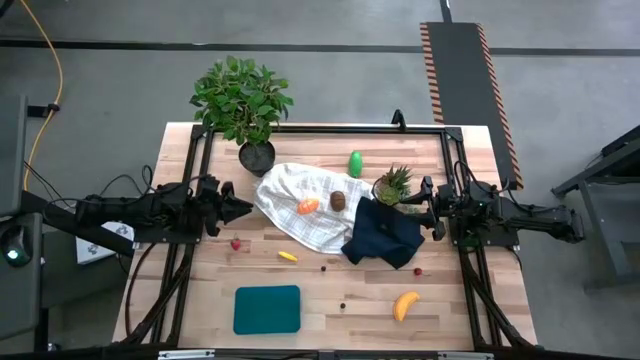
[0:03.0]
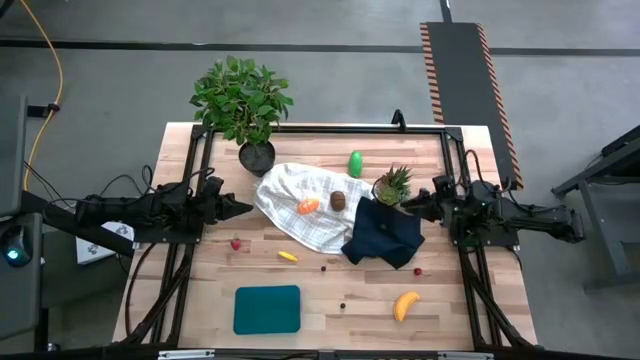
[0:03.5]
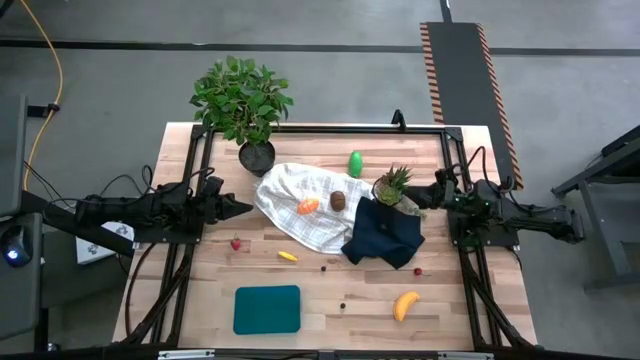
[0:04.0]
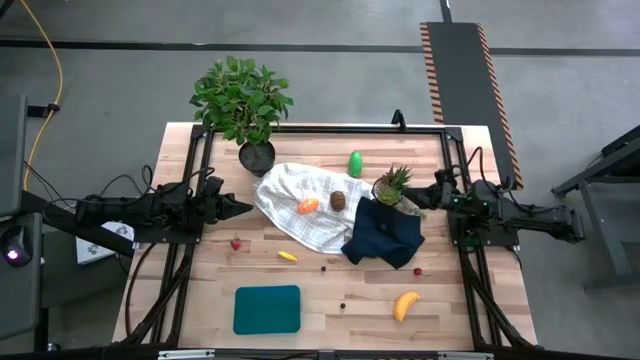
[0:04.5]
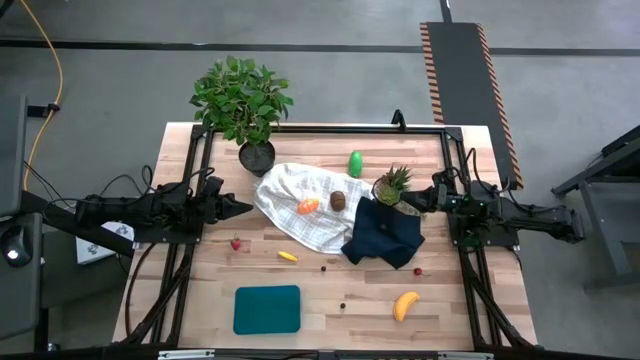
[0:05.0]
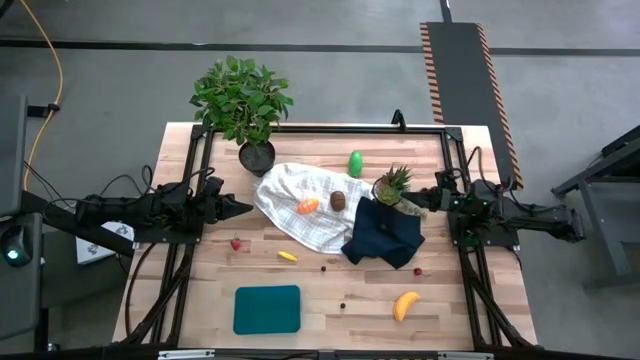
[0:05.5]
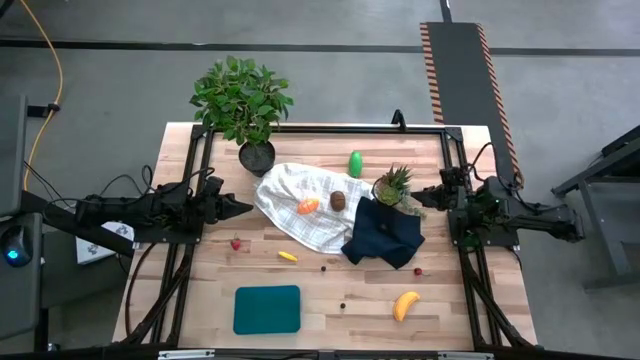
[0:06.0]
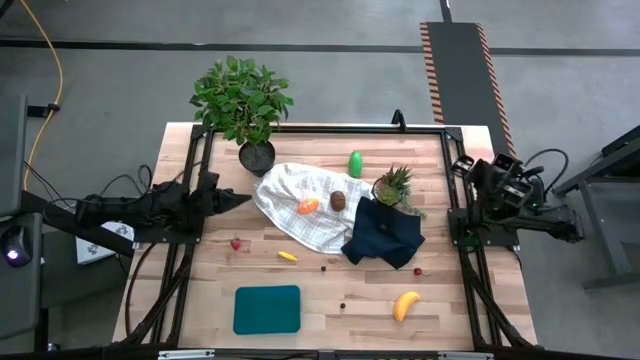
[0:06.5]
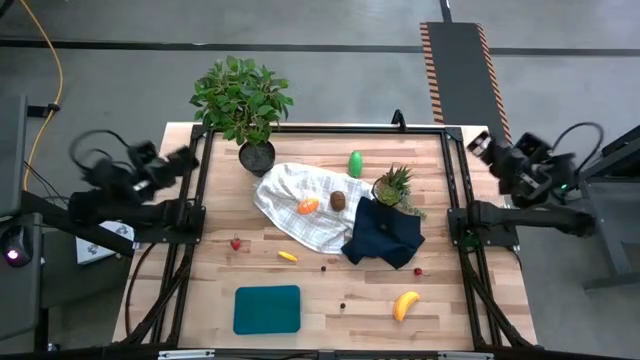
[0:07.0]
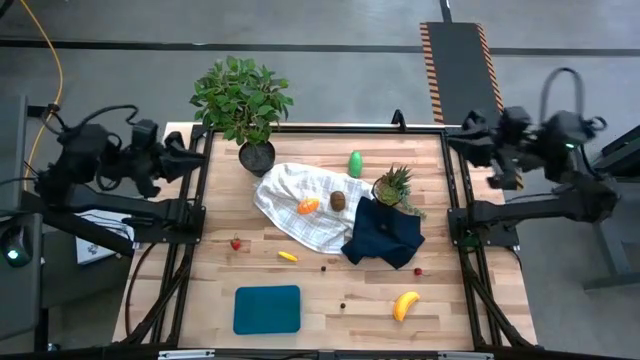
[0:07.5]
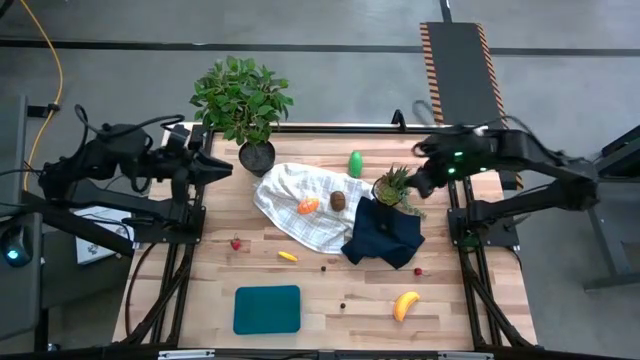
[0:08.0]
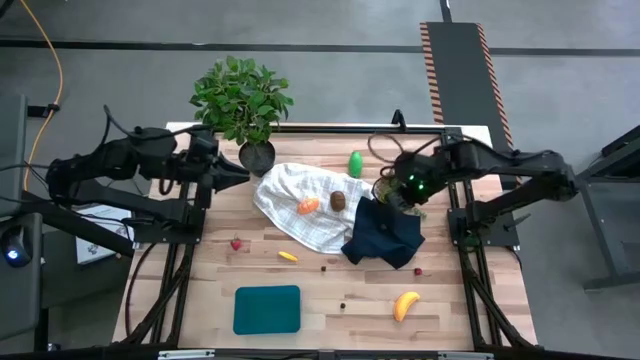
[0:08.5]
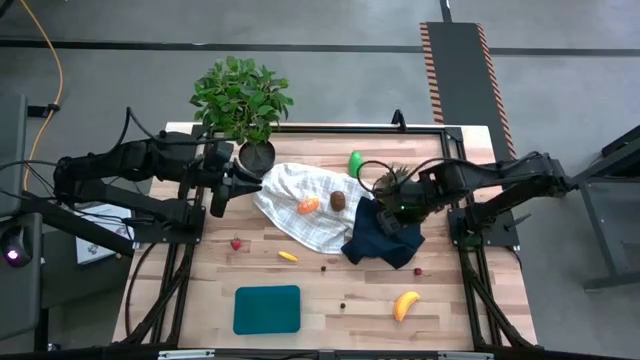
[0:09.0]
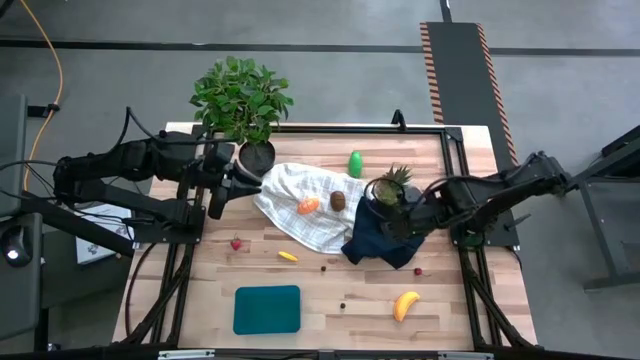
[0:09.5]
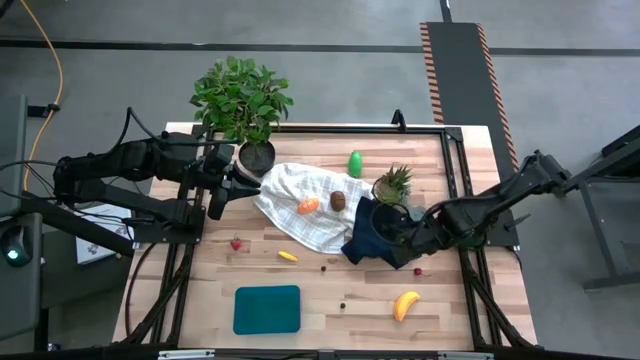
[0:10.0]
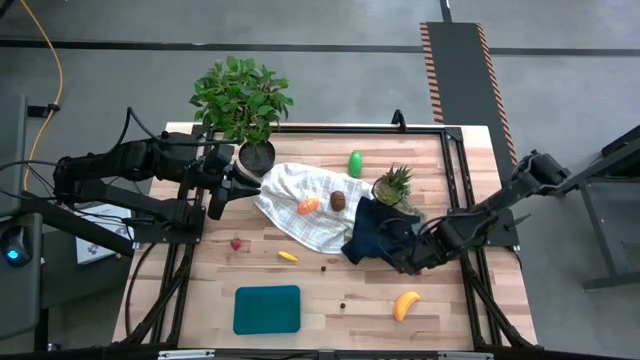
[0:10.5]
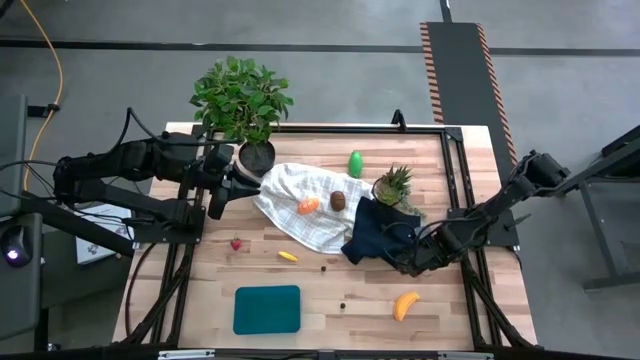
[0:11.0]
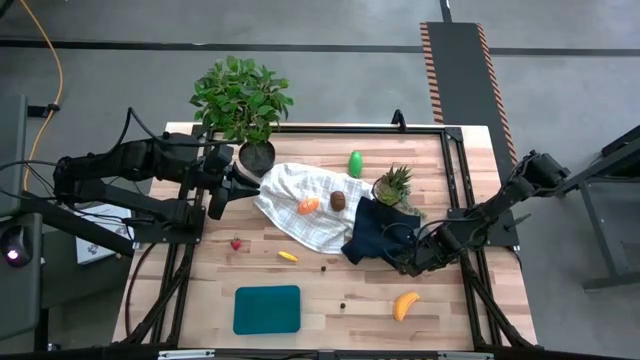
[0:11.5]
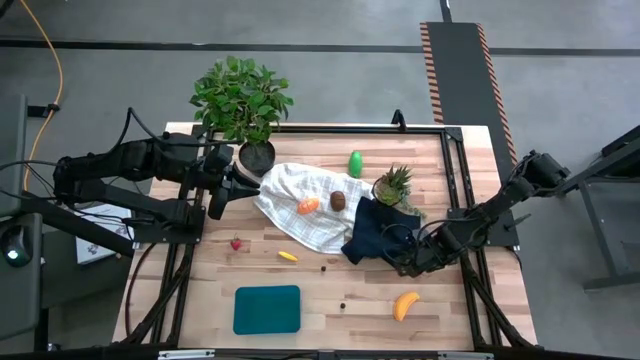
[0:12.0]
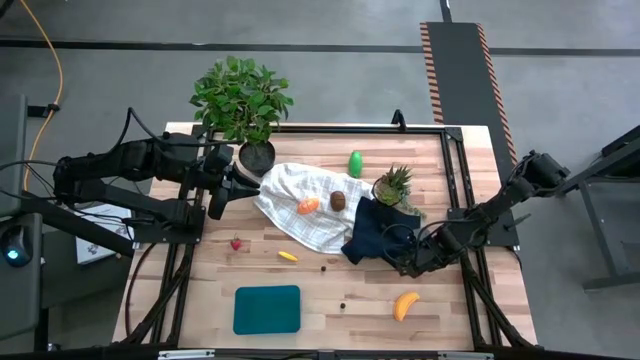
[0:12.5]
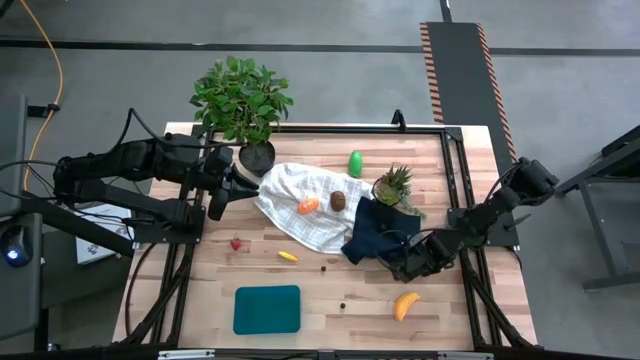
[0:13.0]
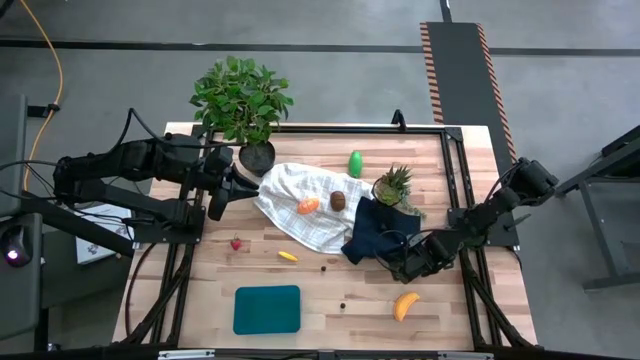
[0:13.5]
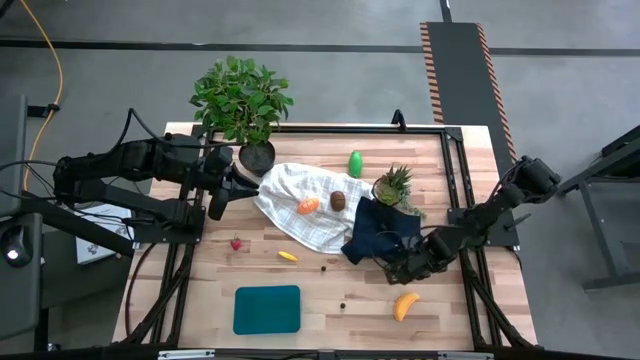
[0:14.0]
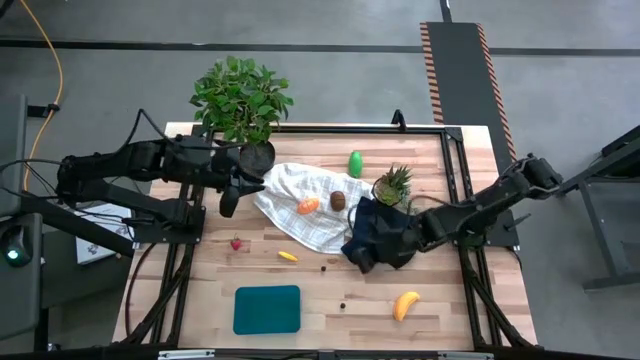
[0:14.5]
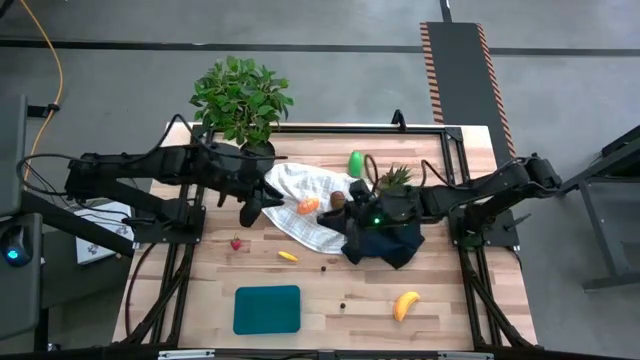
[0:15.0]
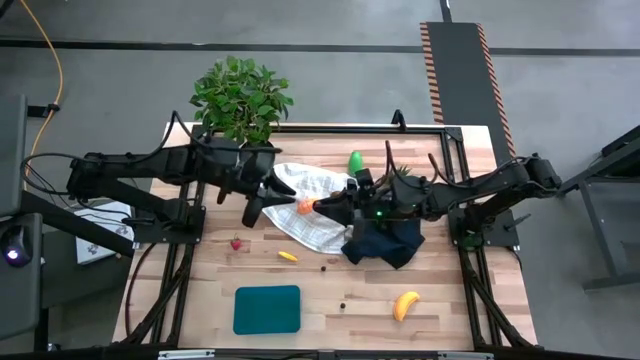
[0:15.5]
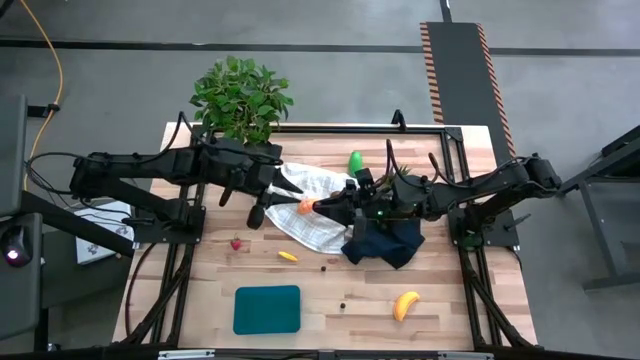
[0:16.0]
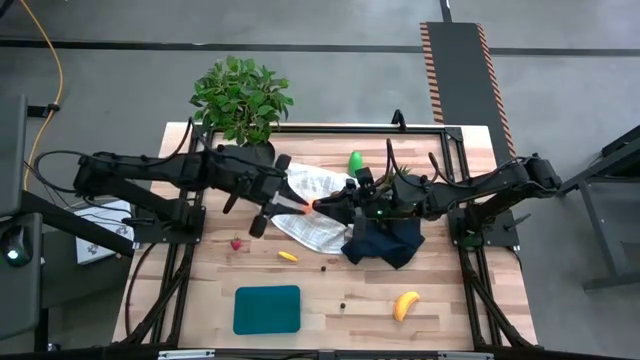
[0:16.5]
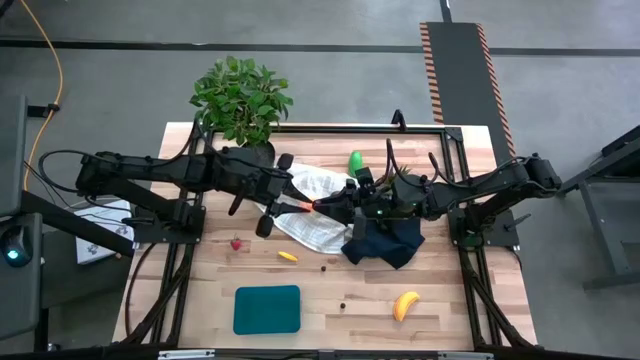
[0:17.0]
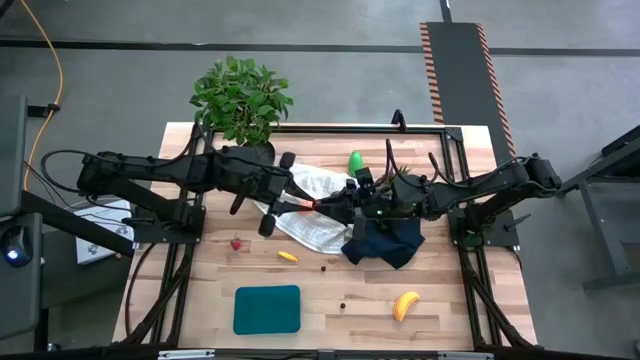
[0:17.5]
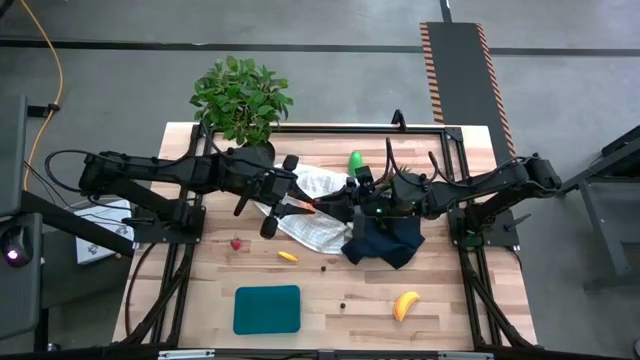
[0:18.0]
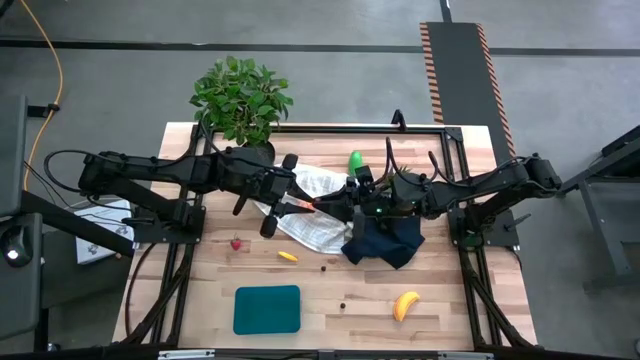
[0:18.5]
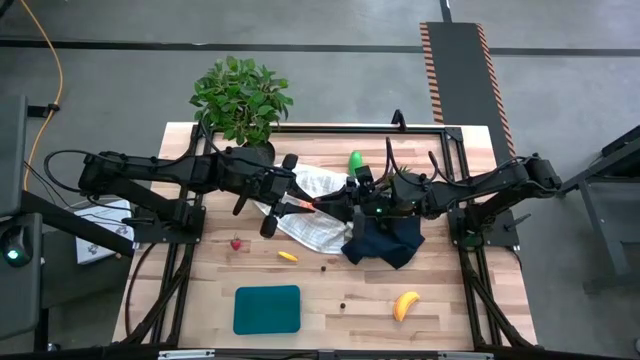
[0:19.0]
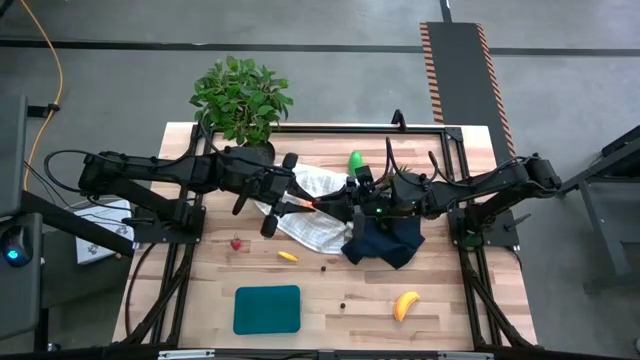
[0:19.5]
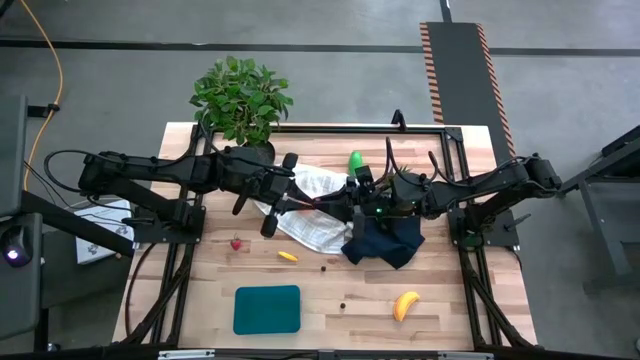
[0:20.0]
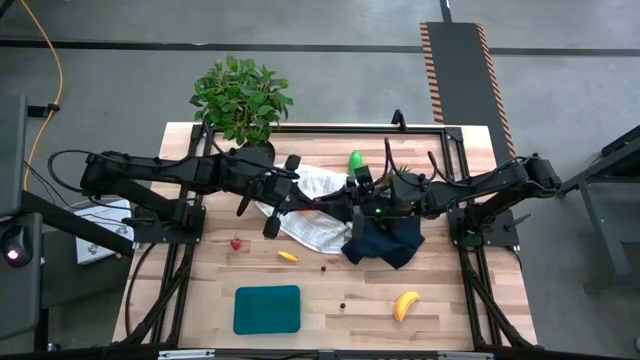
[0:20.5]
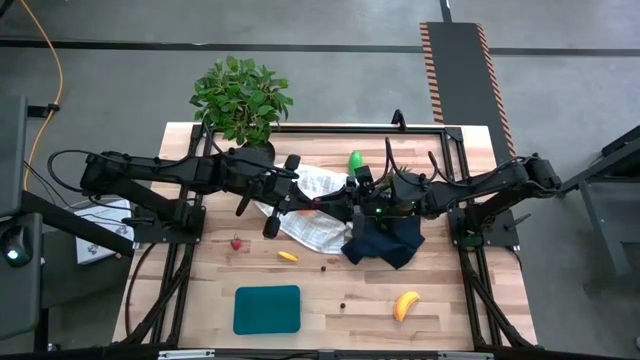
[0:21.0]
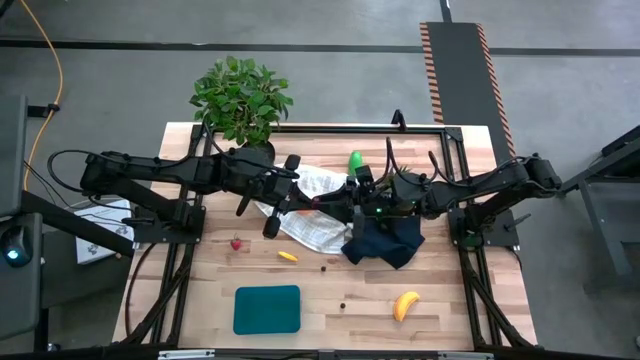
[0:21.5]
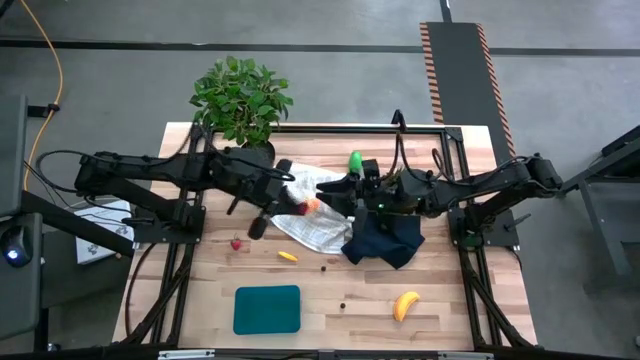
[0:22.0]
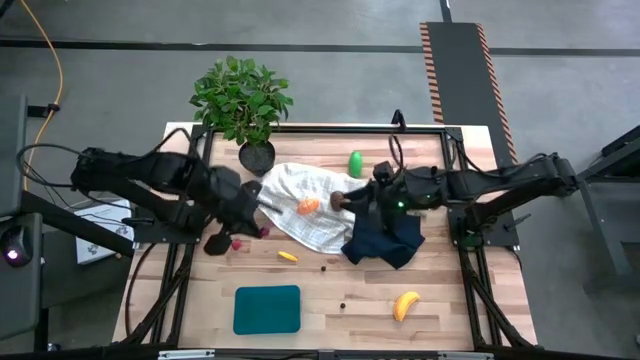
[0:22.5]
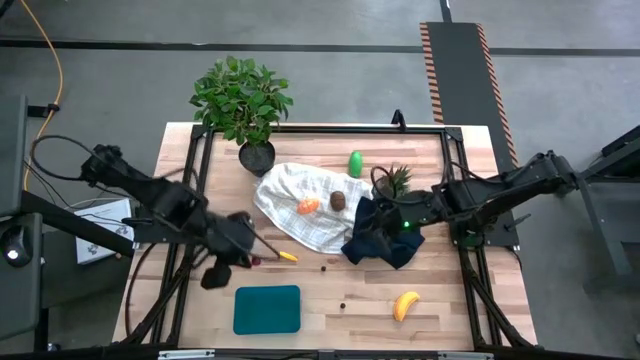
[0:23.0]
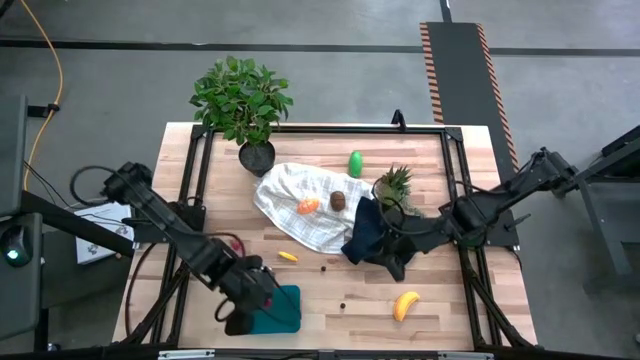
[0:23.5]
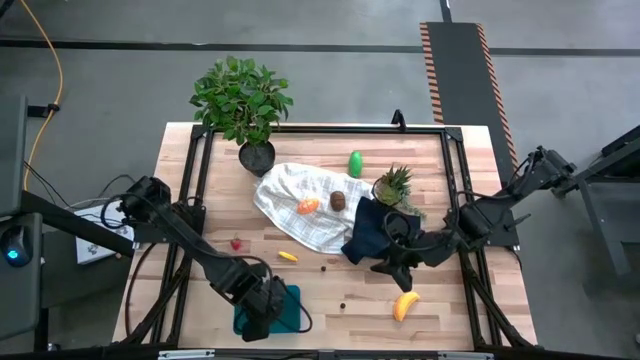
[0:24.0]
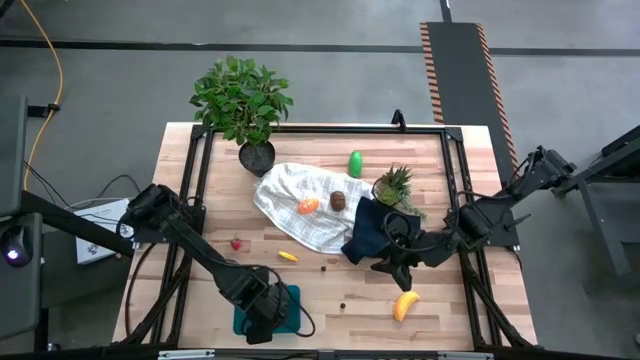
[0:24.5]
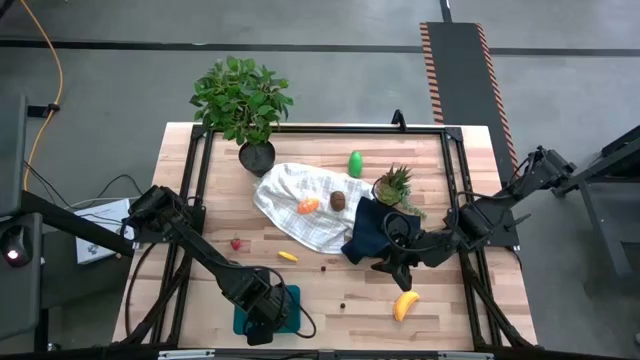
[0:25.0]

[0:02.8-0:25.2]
Task: Pick and placing Produce into tupperware
Put the cherry into the bin
